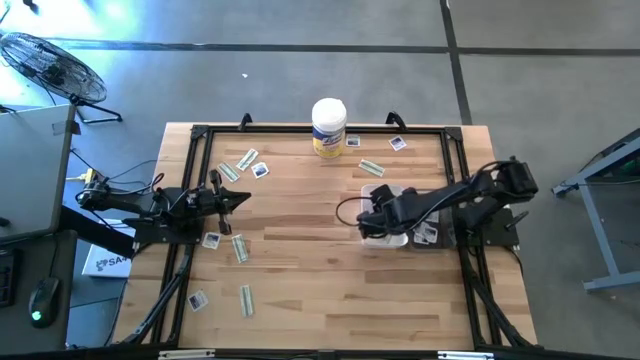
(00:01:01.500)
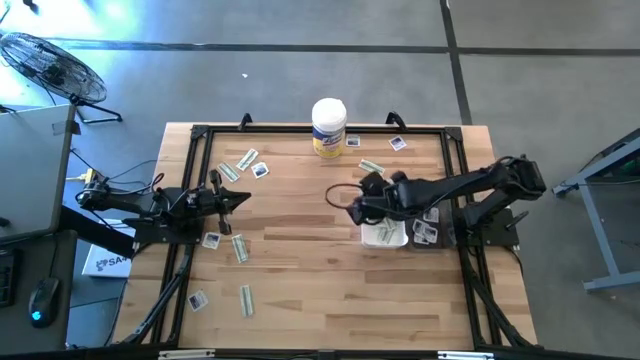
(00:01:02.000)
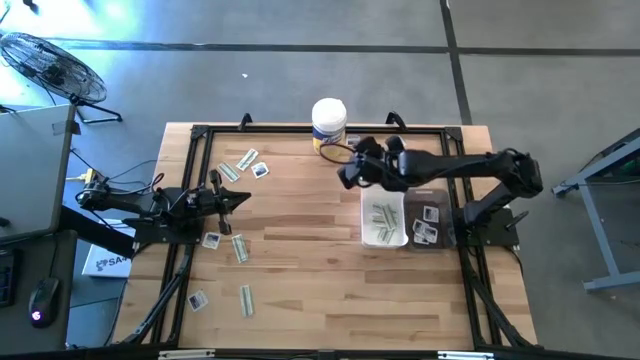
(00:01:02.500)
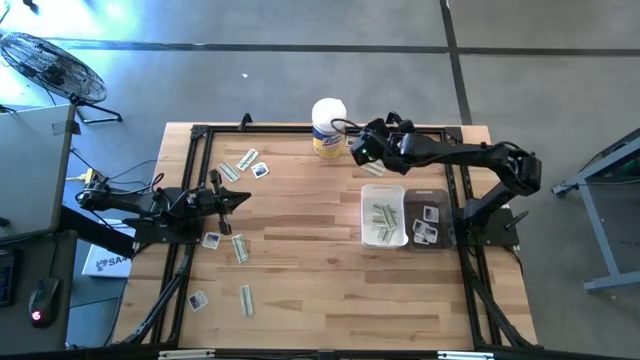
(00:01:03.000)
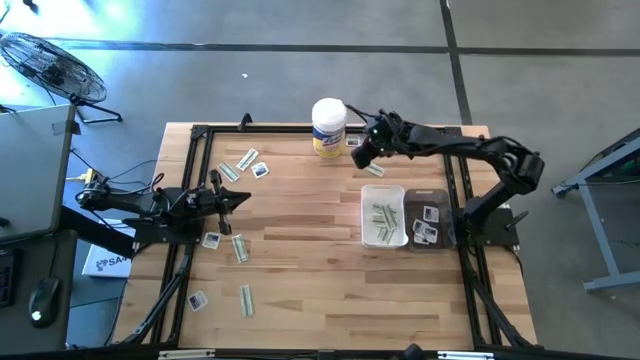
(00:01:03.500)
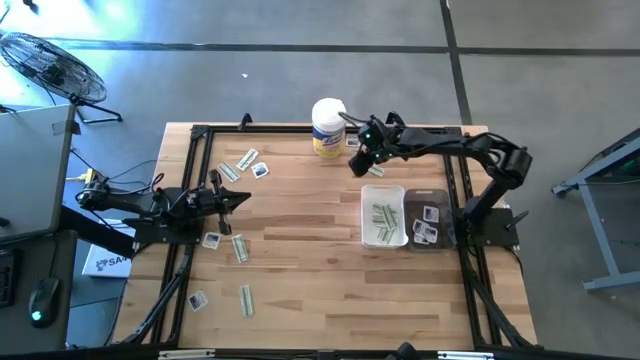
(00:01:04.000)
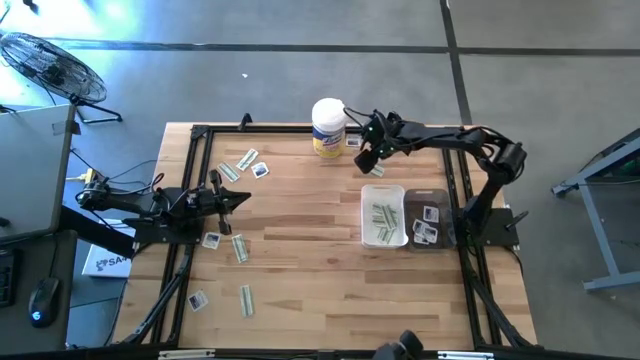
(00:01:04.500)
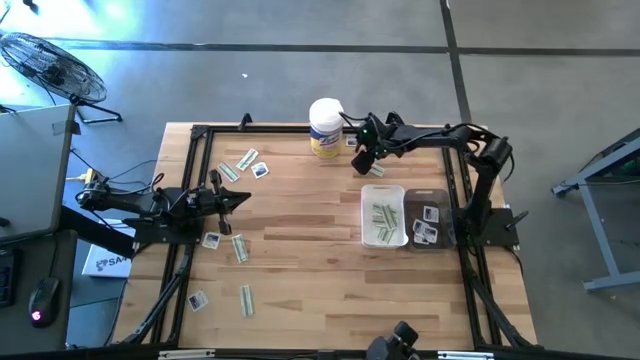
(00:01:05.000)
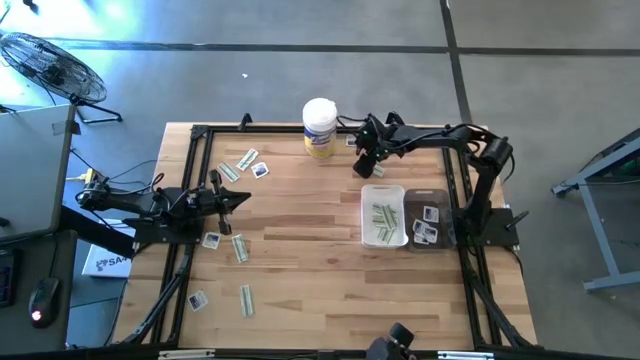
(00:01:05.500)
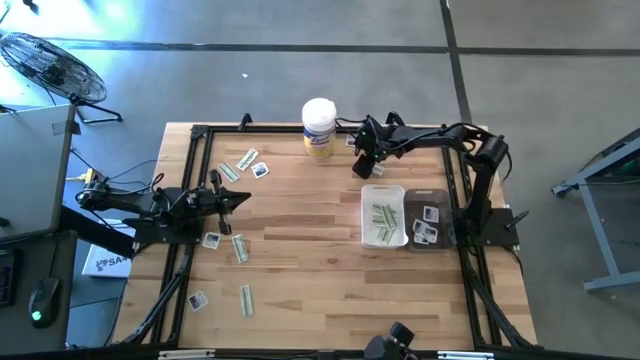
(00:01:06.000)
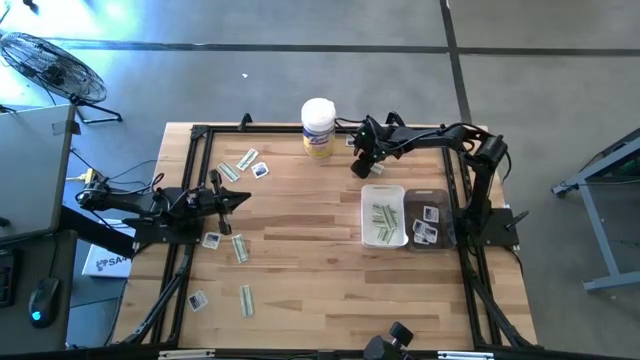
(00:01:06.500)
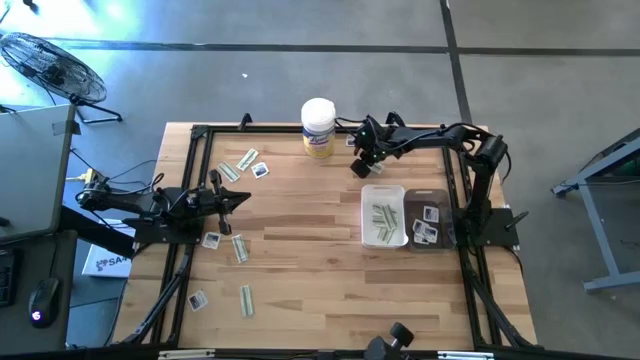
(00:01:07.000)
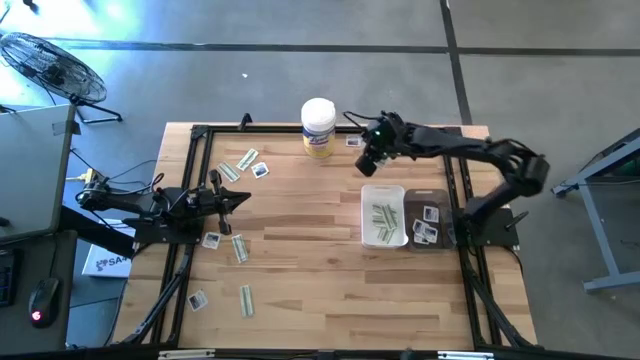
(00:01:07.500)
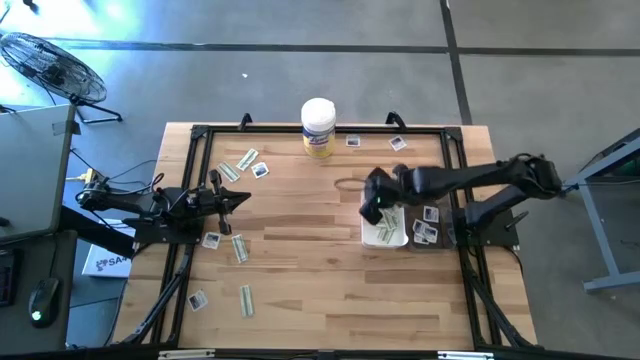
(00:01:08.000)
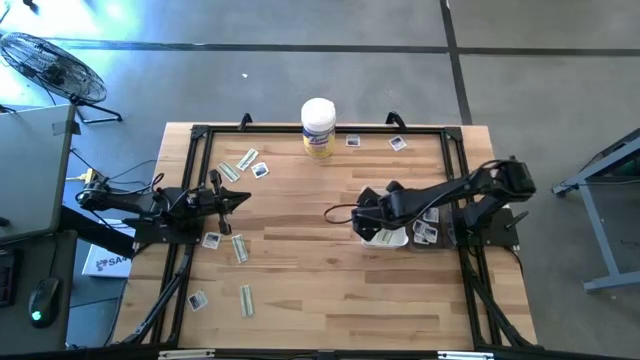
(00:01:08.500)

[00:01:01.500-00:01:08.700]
Task: Pick & Place First Aid Supplies
Put the green bandage pack into the white bin

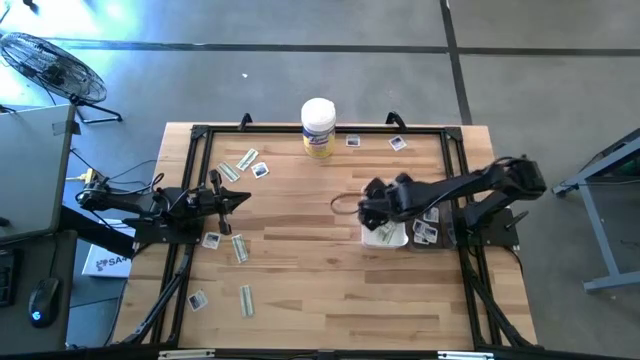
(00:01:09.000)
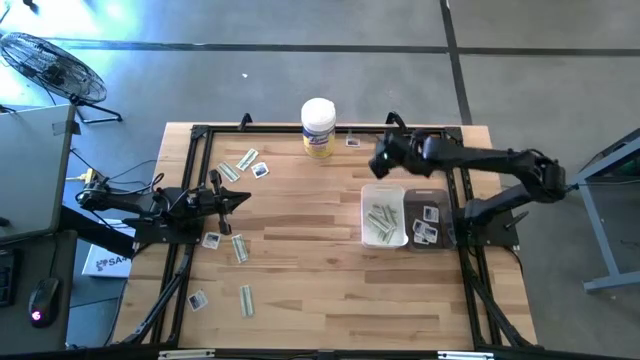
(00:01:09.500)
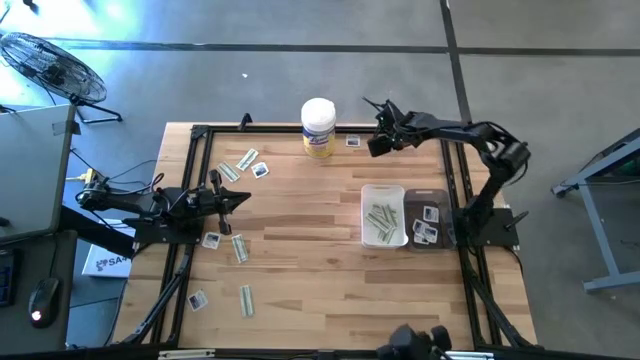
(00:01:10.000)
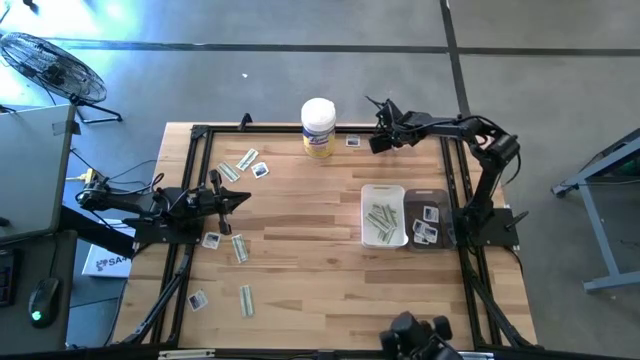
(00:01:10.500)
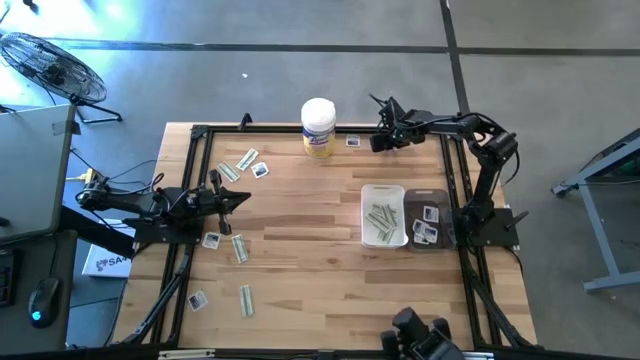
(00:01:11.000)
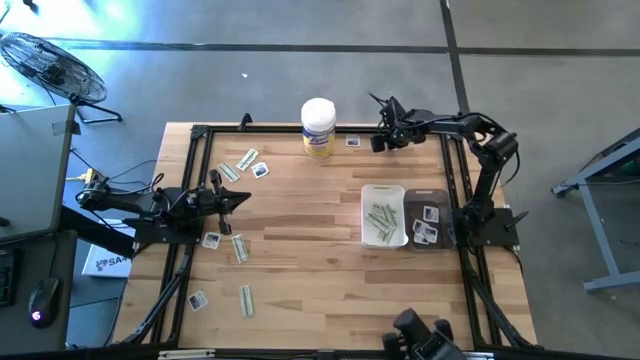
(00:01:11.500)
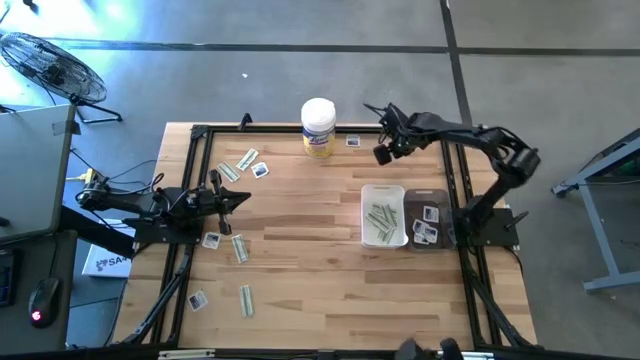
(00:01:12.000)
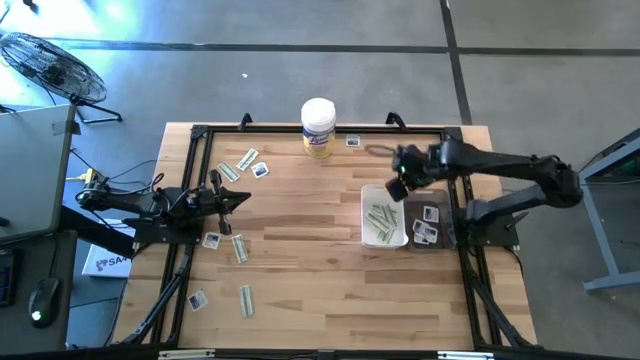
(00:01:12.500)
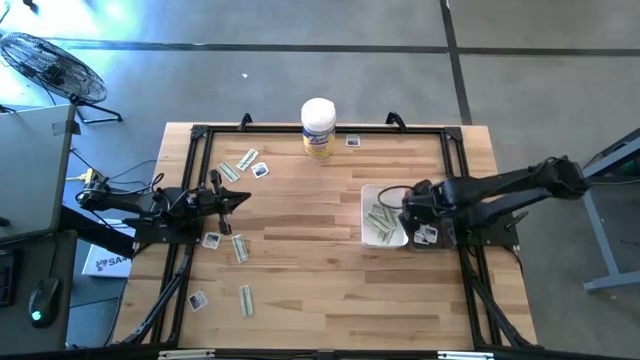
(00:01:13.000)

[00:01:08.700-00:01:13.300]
Put the blue alcohol pad into the black bin

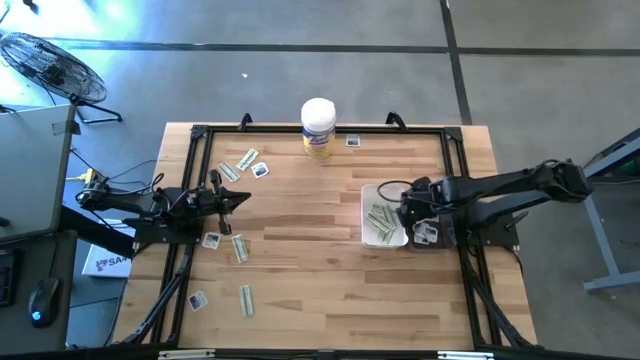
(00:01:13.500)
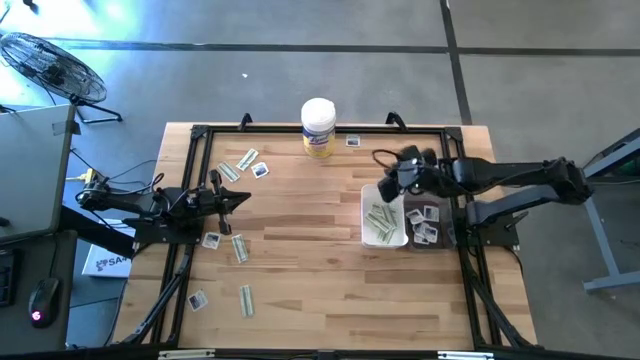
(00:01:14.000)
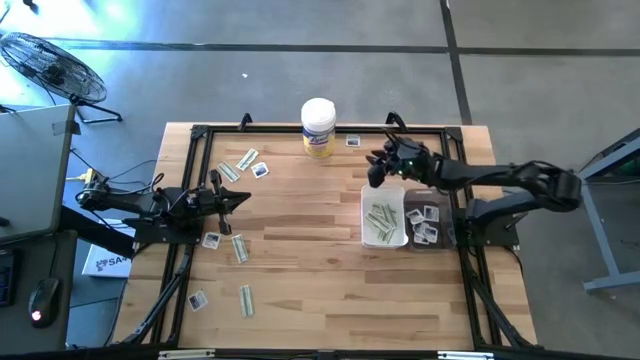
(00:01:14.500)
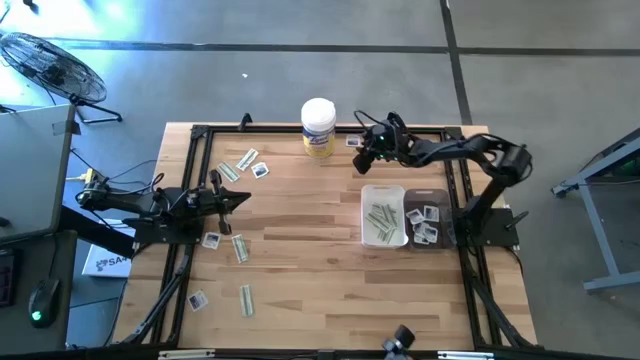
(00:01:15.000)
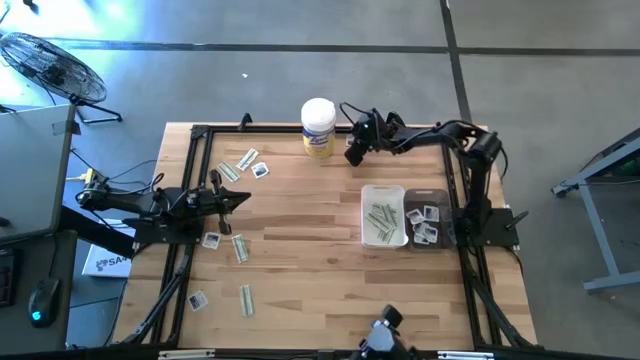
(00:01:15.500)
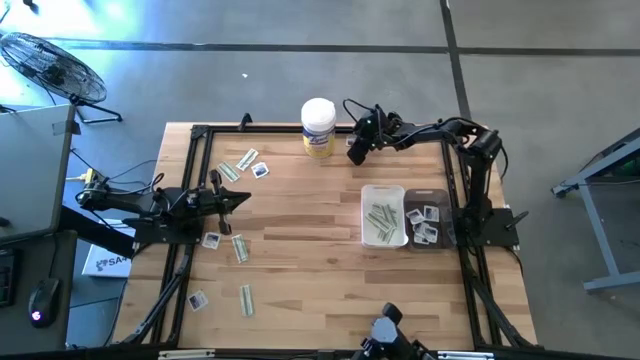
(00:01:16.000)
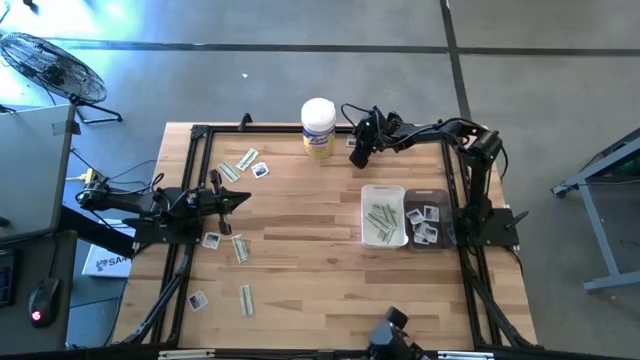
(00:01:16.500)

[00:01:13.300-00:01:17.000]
Put the blue alcohol pad into the black bin

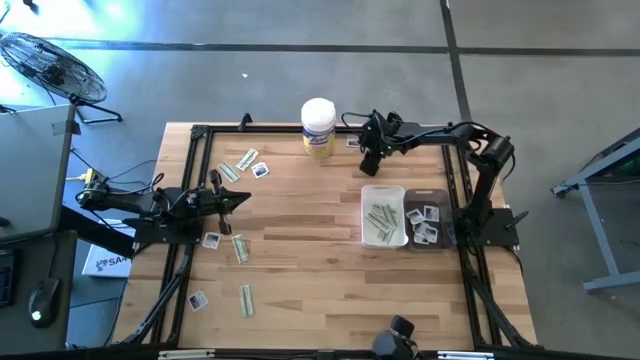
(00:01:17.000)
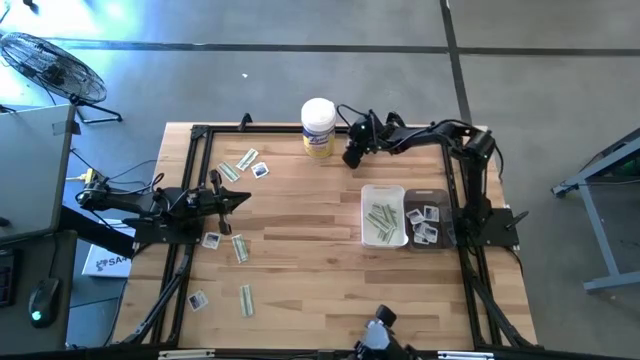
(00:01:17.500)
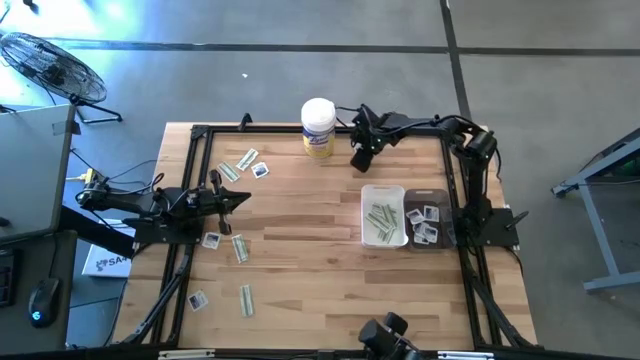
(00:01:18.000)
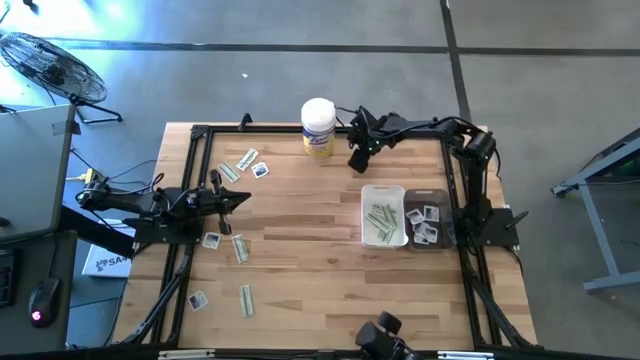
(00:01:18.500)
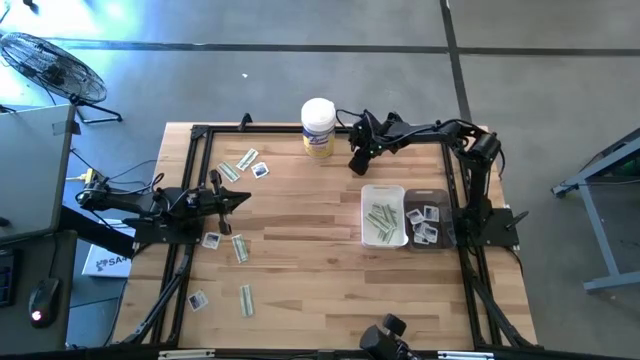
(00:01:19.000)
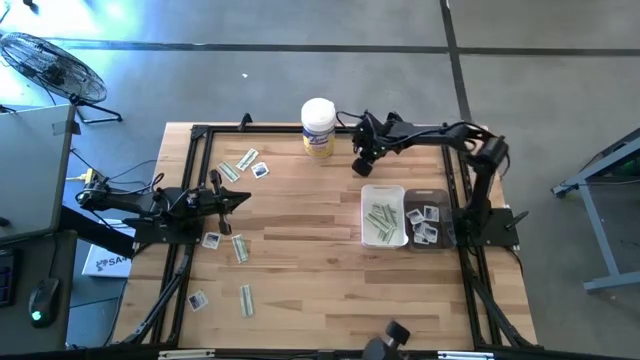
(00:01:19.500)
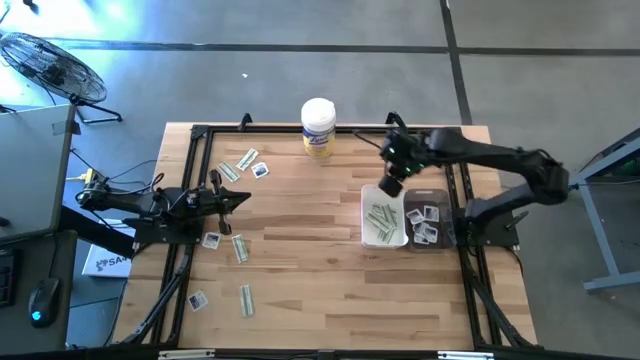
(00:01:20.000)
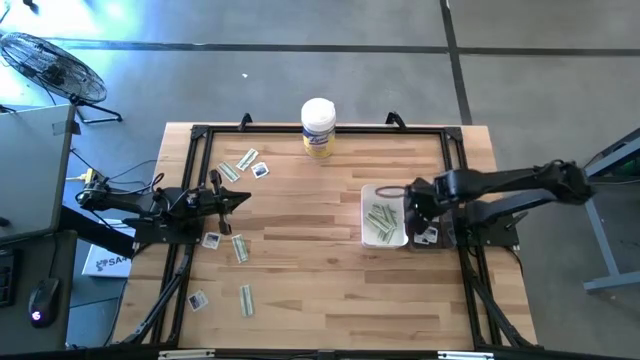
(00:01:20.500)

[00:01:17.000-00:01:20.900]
Put the blue alcohol pad into the black bin

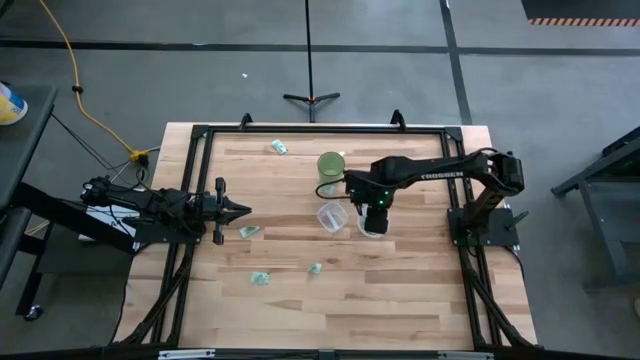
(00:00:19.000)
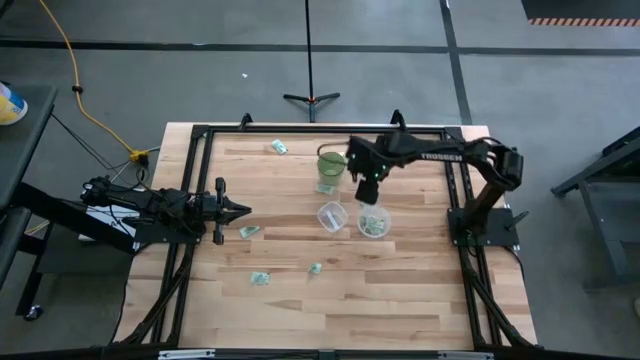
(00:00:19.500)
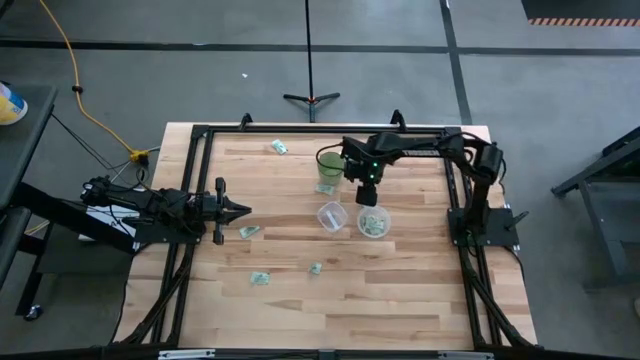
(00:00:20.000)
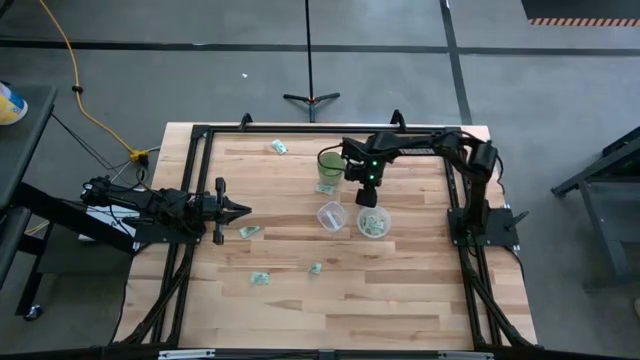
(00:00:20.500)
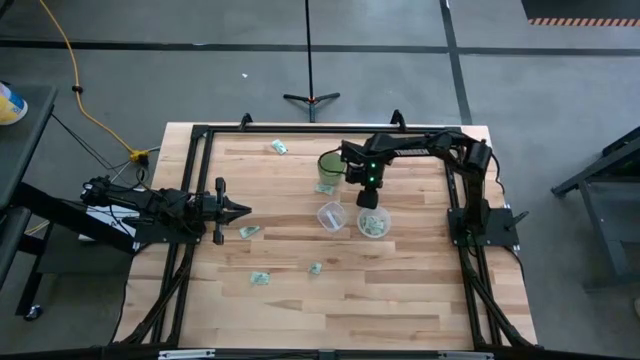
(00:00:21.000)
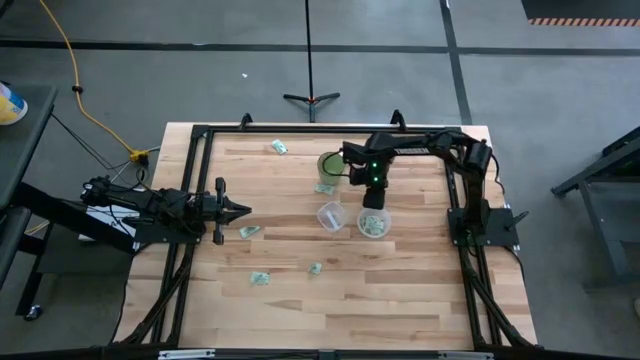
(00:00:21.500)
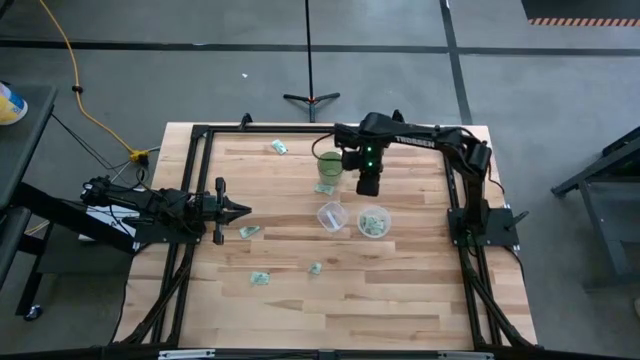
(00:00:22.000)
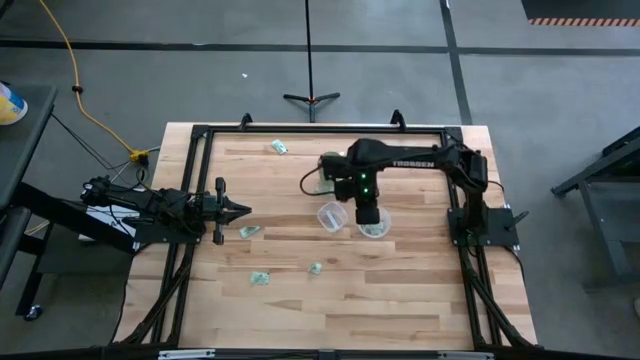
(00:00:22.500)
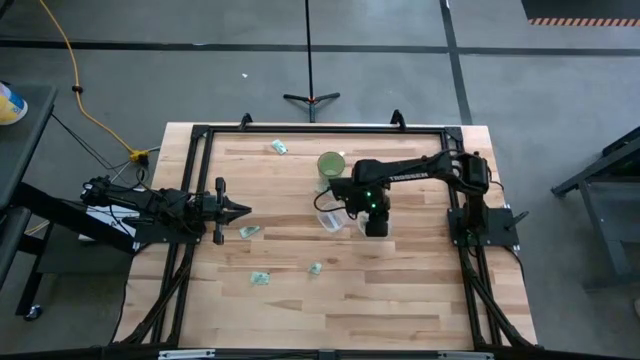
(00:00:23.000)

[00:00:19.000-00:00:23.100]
Task: Pick and place items into bin
Put the stevia packet into the right transparent bin
